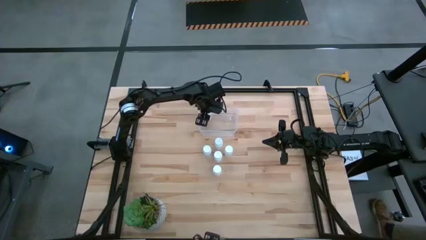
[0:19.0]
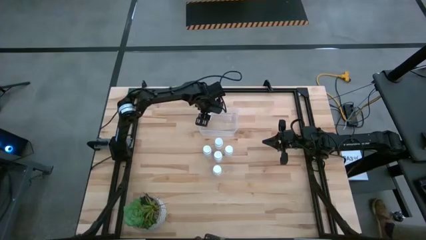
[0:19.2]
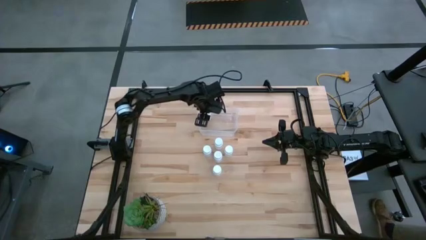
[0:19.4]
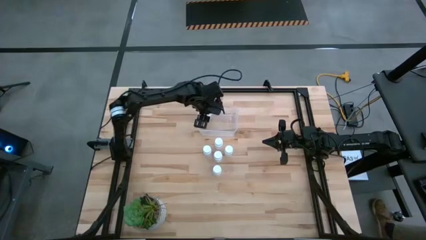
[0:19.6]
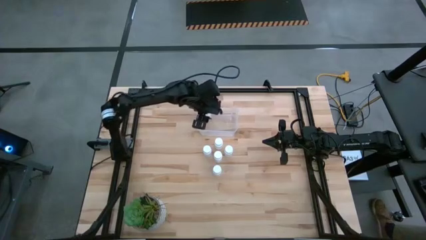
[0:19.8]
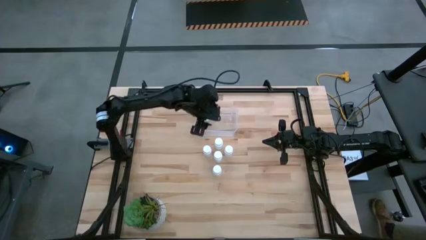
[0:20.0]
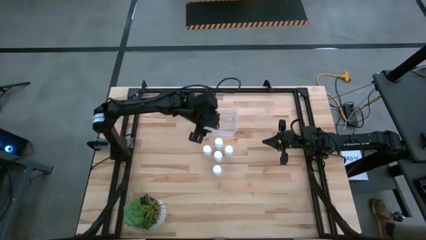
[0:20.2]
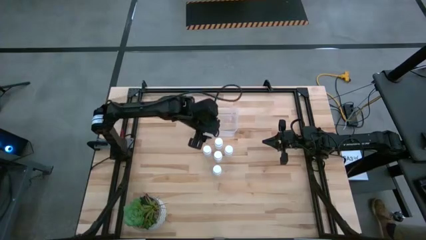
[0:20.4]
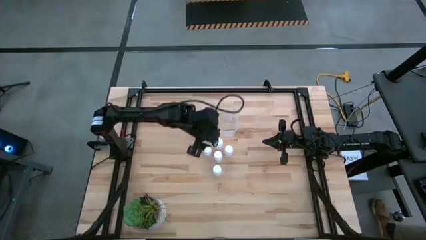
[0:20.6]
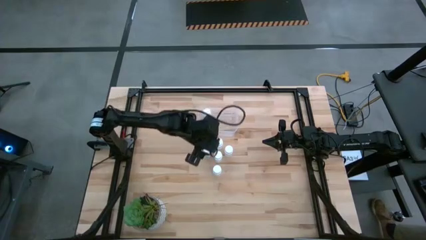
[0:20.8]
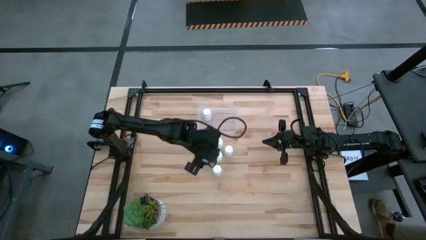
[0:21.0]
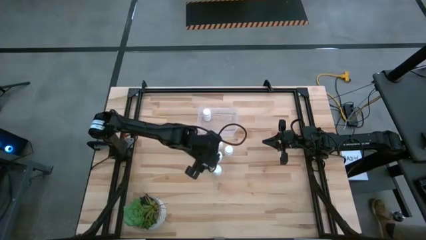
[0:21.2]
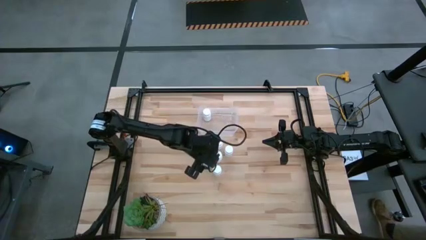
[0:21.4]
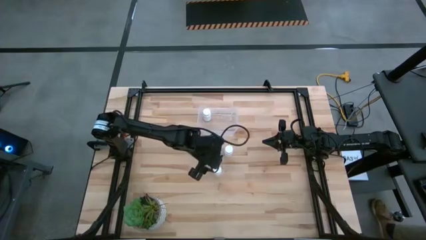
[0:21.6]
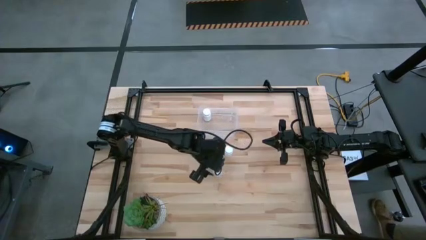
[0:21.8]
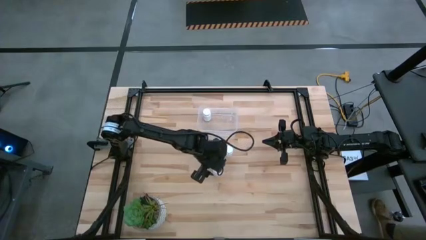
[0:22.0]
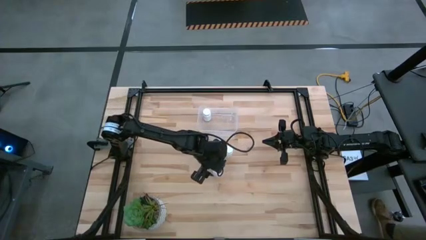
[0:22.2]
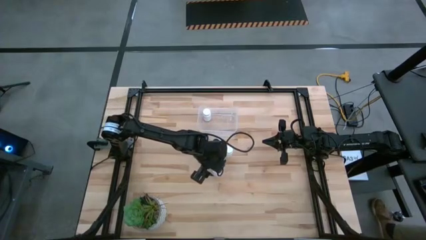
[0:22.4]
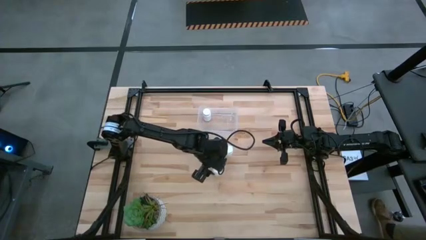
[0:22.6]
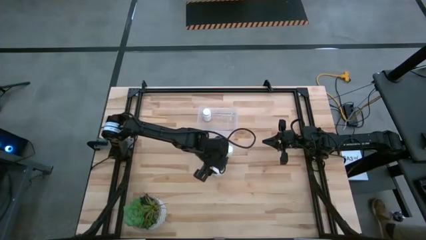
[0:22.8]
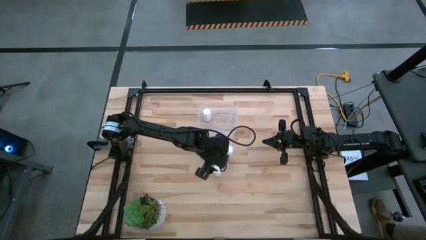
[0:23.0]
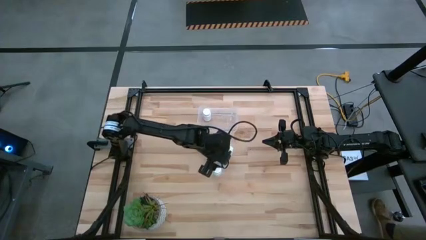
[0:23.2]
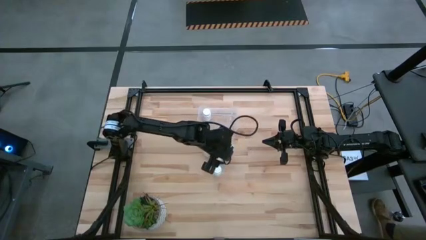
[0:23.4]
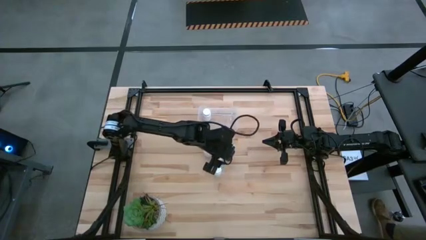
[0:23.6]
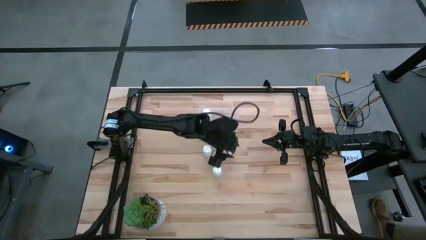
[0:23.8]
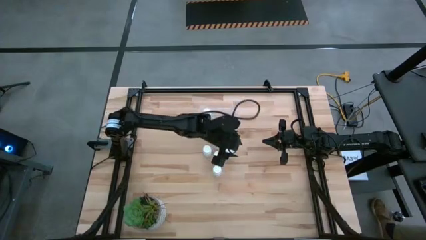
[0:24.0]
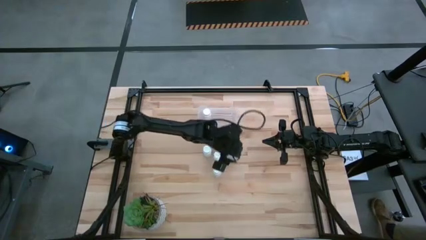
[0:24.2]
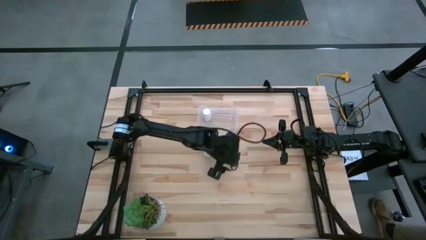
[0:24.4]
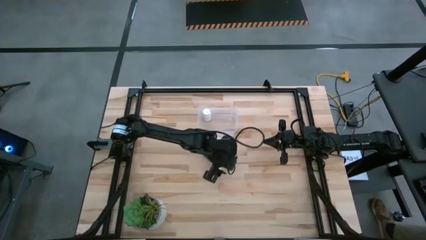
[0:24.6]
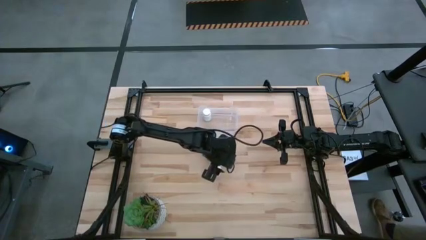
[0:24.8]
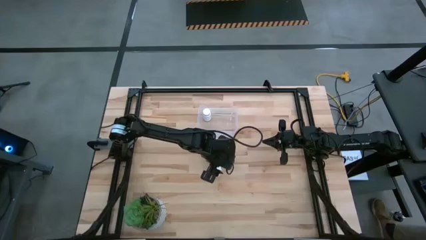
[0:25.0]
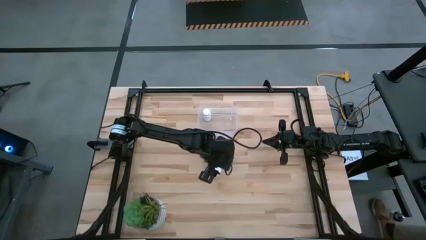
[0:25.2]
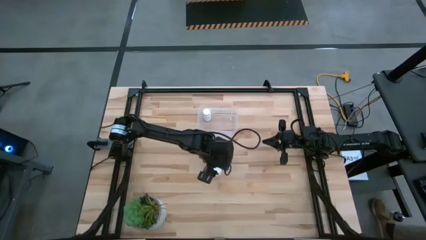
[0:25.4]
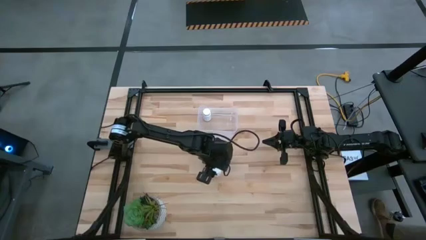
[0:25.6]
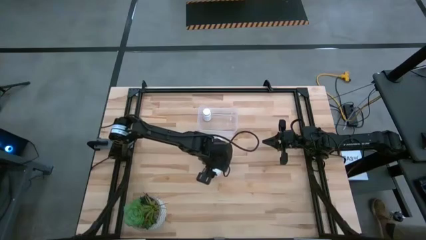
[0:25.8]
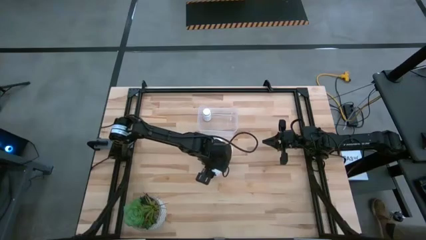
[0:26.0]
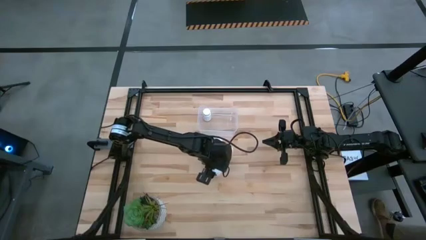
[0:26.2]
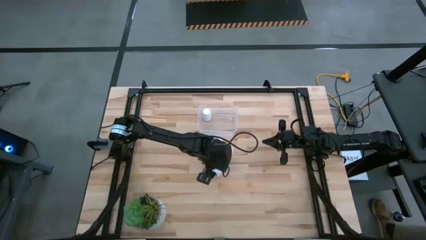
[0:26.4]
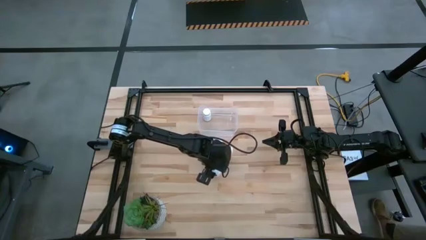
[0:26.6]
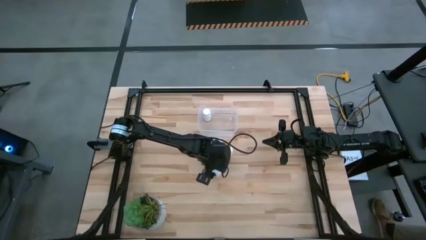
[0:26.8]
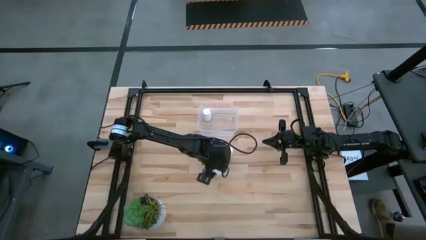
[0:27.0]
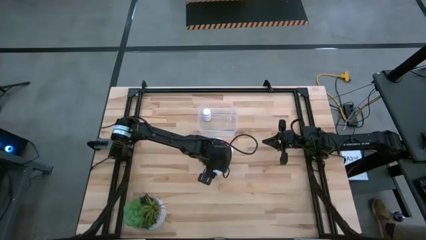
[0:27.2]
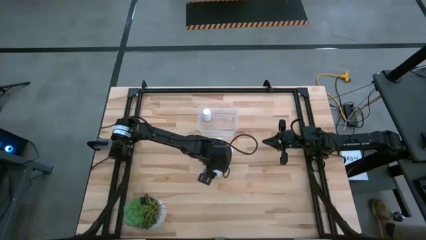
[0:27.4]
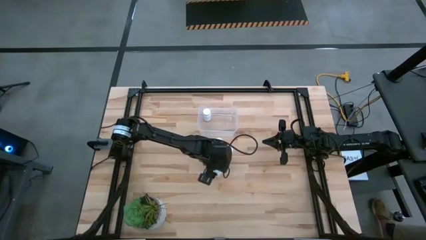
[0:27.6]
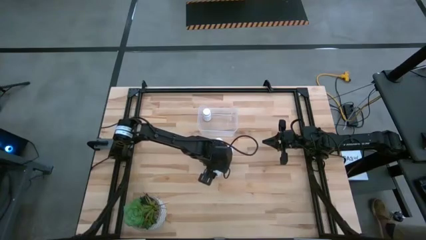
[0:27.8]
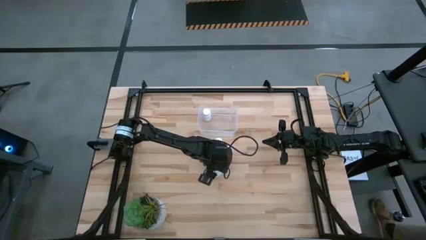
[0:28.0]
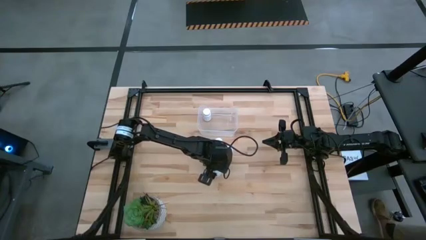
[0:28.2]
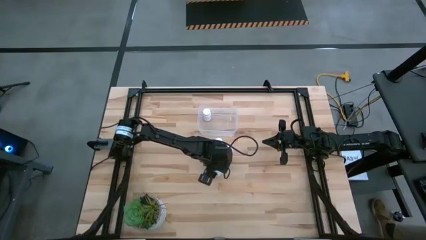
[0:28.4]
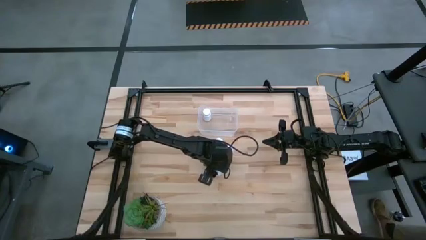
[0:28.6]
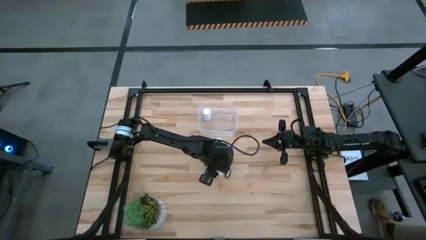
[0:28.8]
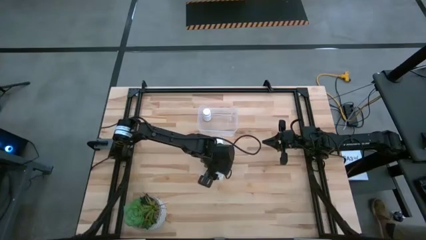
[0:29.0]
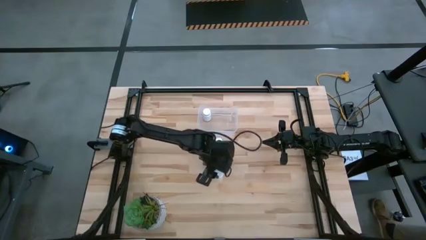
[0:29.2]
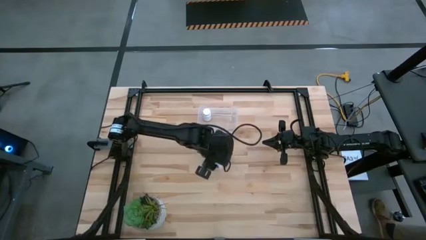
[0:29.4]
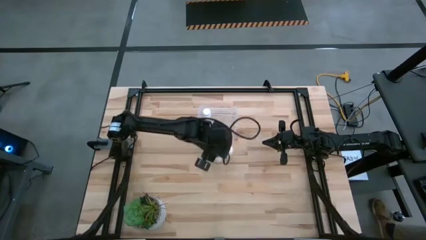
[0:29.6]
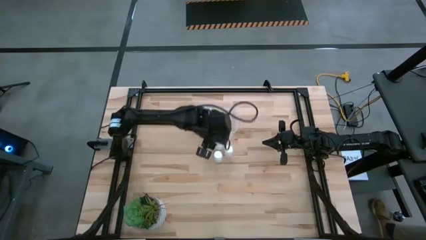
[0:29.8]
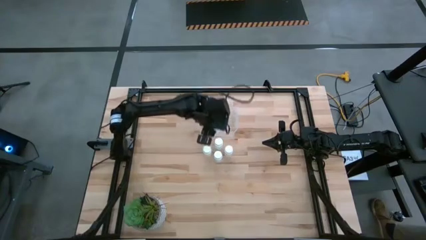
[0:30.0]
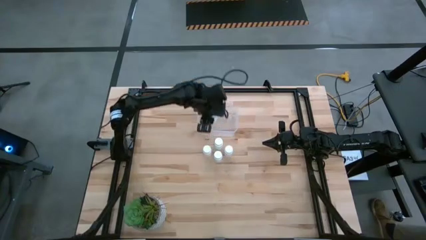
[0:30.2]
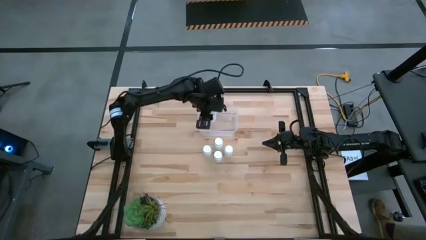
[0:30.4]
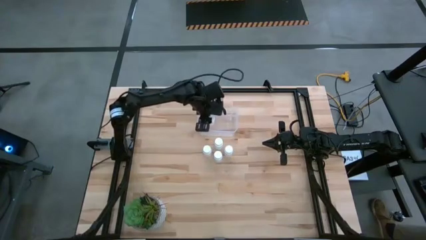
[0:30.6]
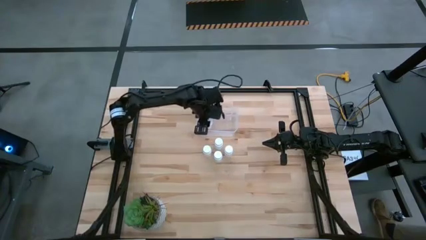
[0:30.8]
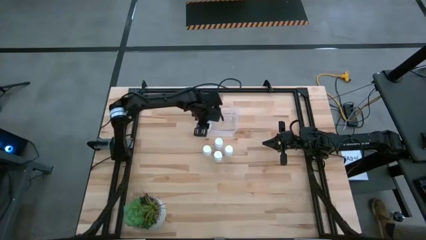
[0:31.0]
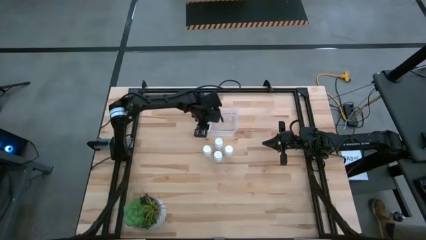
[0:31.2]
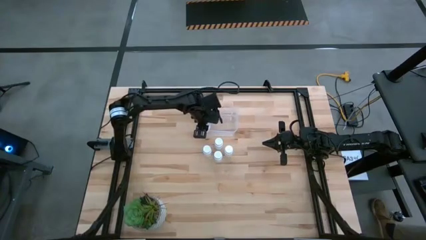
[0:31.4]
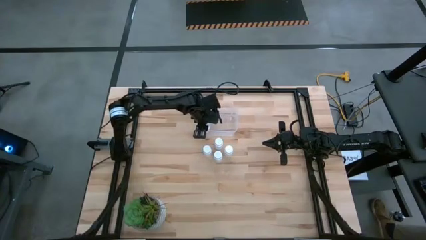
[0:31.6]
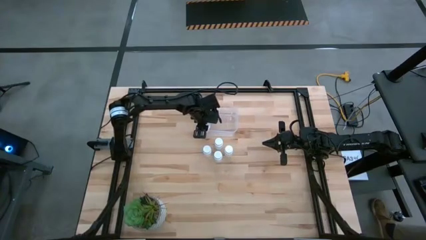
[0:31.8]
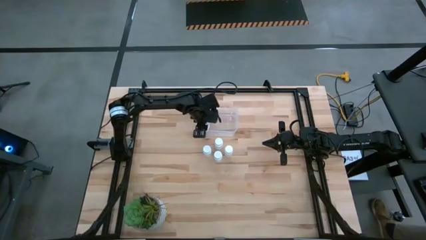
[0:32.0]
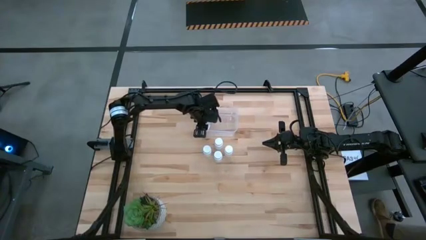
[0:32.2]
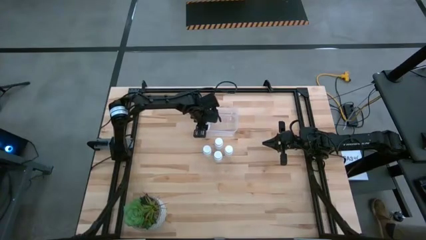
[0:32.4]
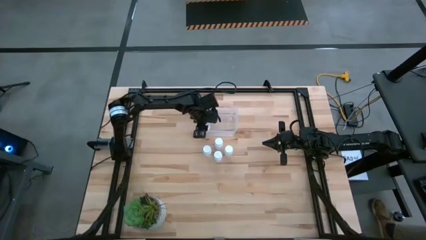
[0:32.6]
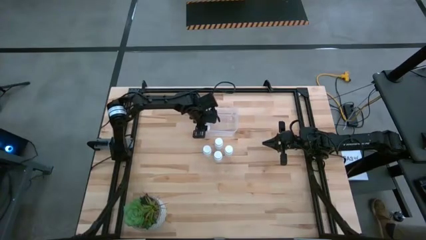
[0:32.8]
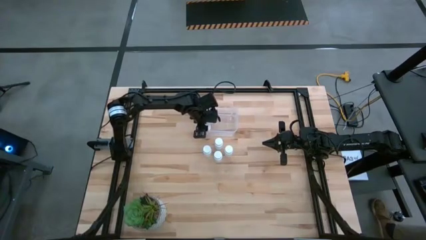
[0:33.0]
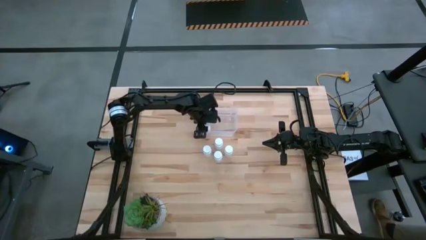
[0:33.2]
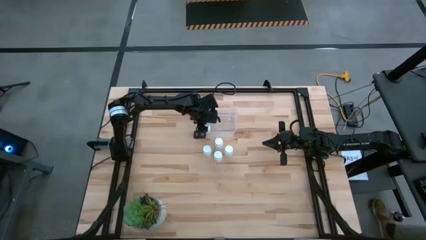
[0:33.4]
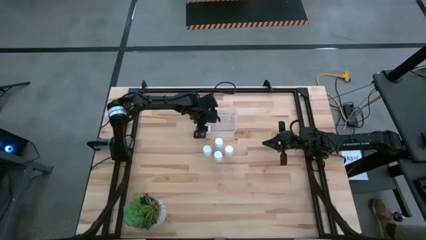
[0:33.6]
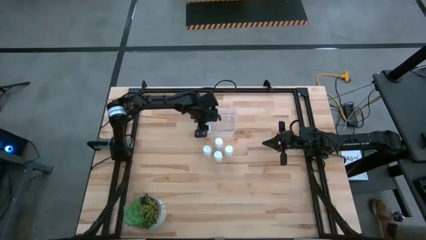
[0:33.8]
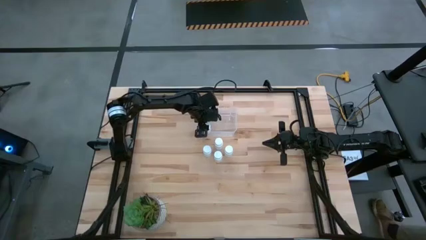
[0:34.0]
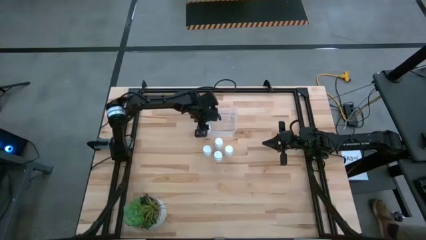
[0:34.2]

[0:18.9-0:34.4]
Task: Pick and place pill bottles into a basket
Put the white pill bottle into the transparent bin
